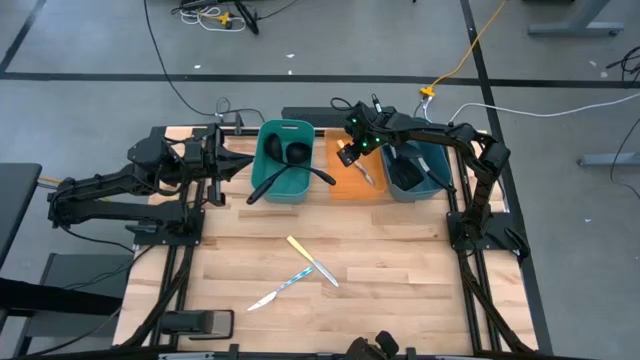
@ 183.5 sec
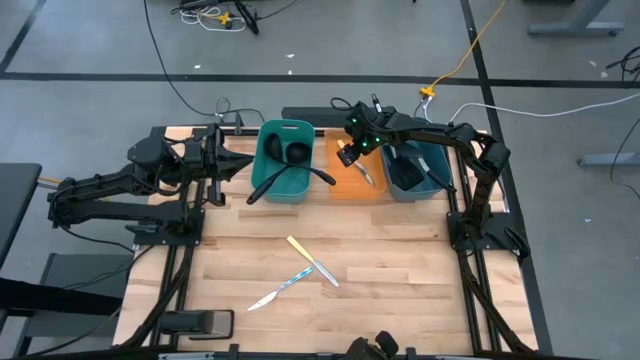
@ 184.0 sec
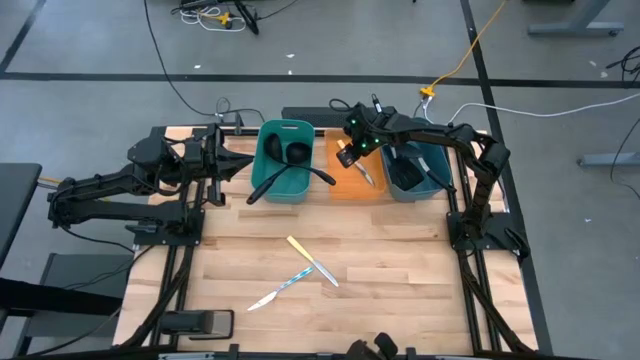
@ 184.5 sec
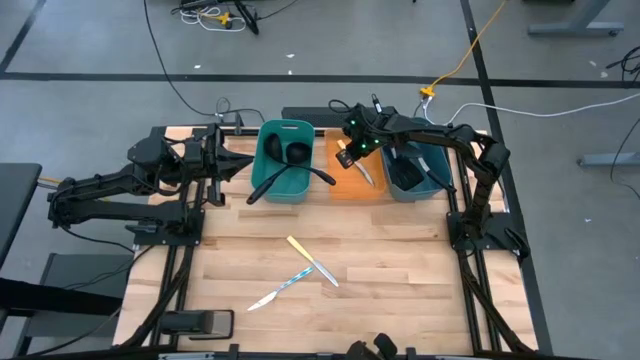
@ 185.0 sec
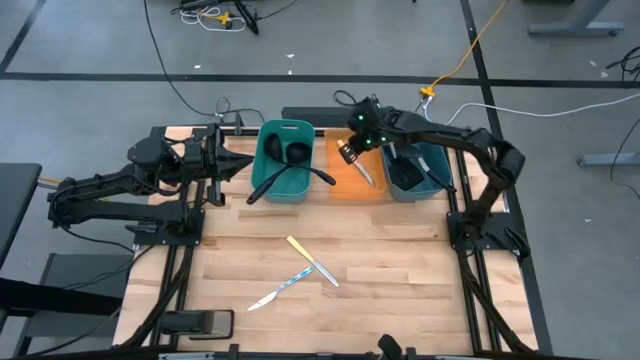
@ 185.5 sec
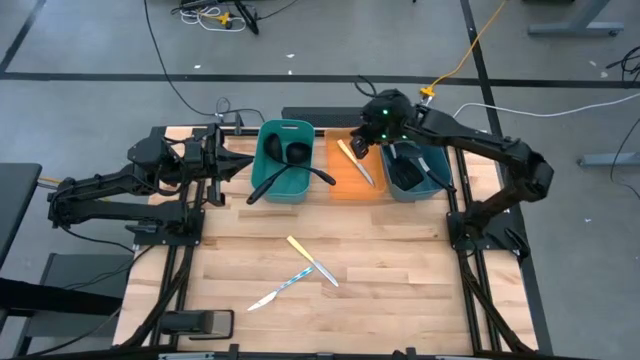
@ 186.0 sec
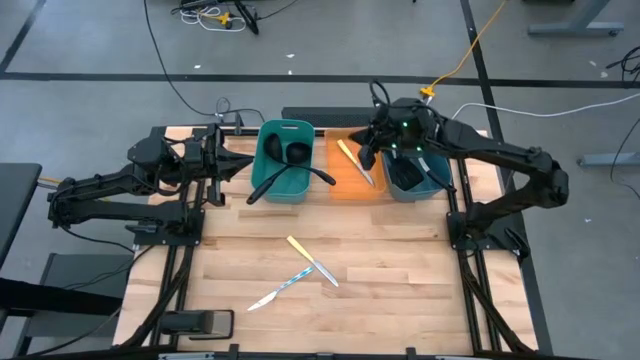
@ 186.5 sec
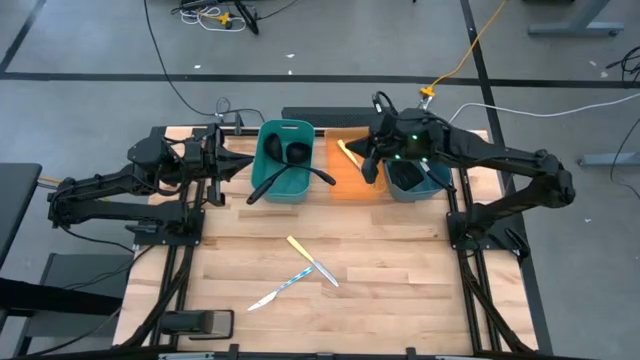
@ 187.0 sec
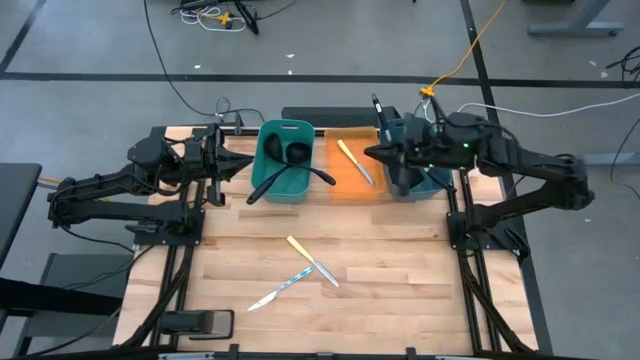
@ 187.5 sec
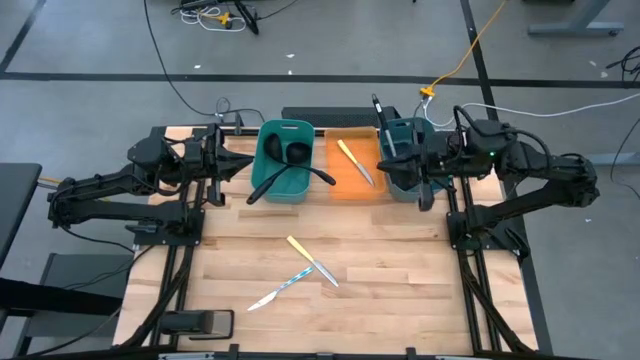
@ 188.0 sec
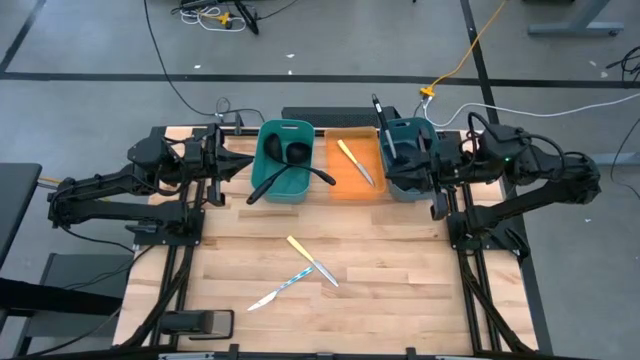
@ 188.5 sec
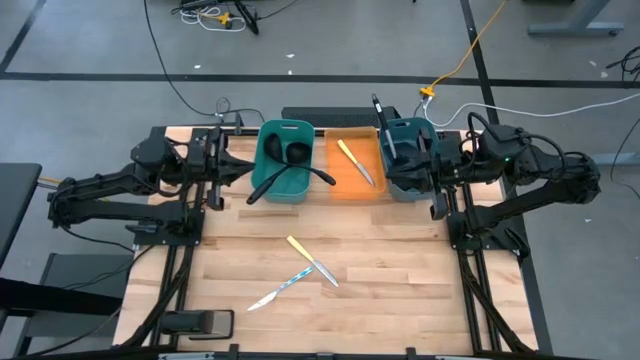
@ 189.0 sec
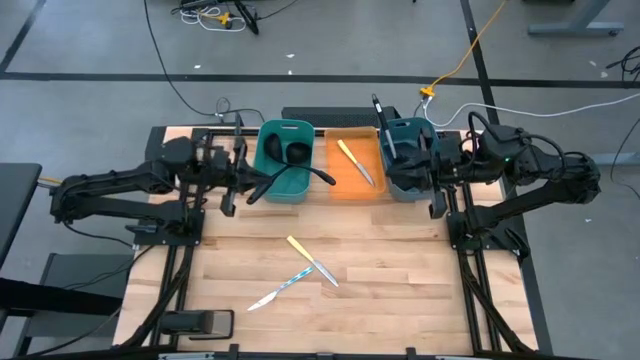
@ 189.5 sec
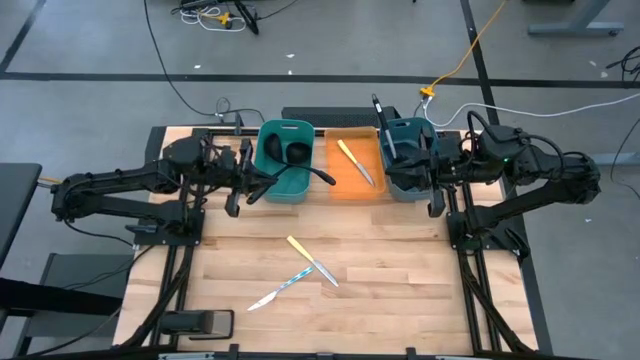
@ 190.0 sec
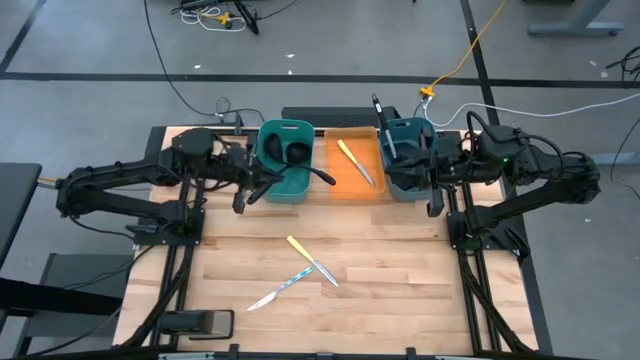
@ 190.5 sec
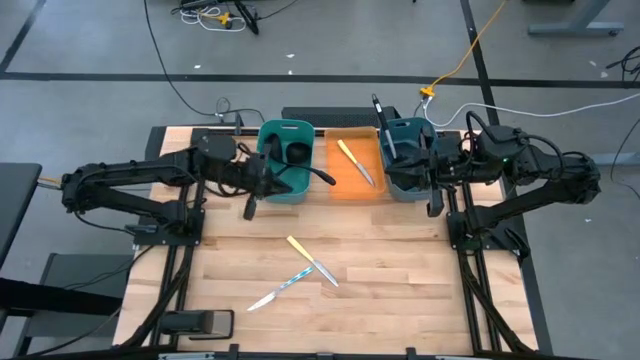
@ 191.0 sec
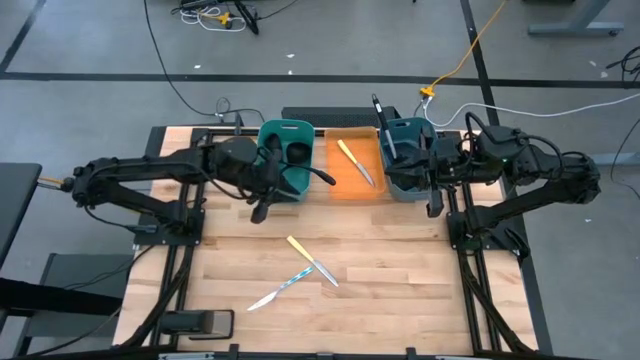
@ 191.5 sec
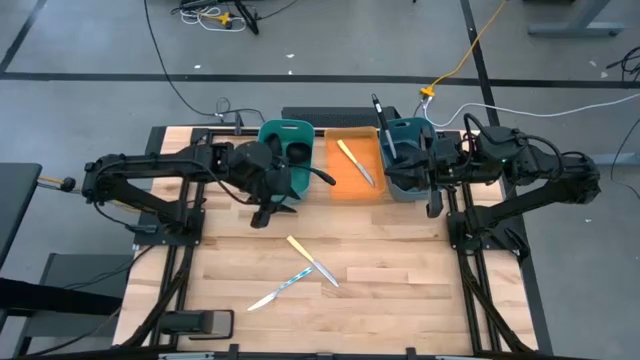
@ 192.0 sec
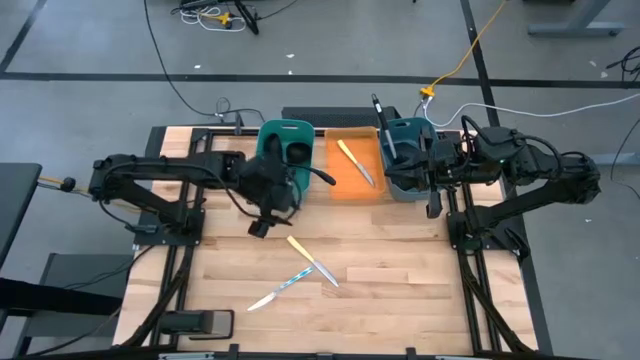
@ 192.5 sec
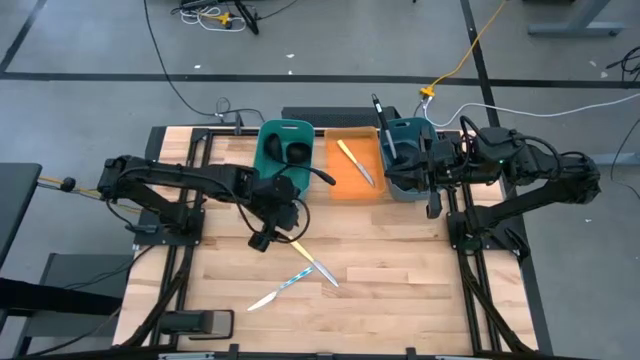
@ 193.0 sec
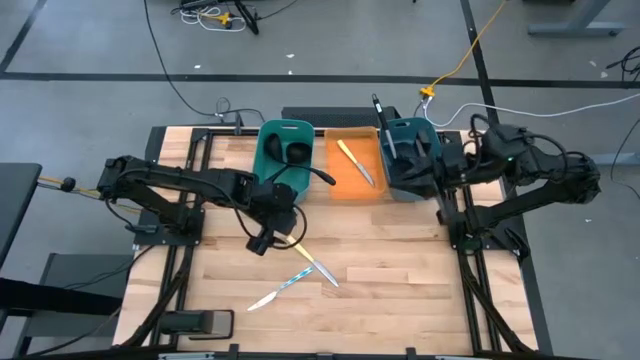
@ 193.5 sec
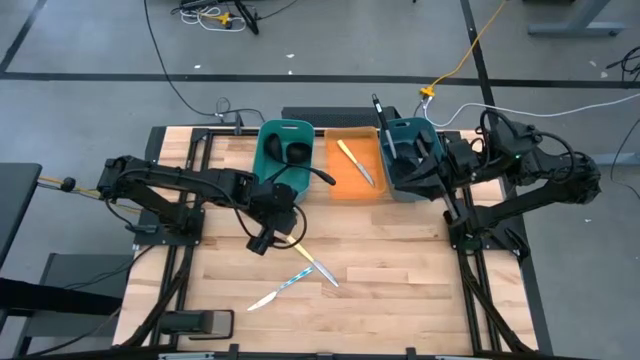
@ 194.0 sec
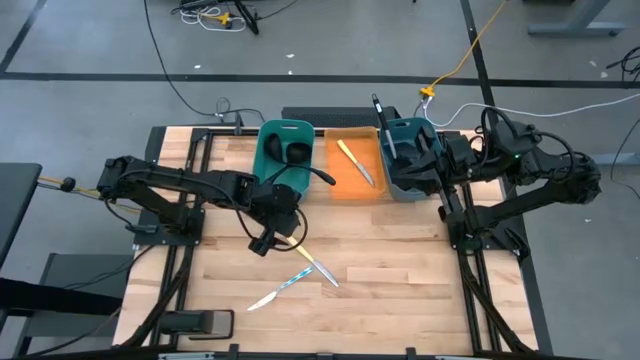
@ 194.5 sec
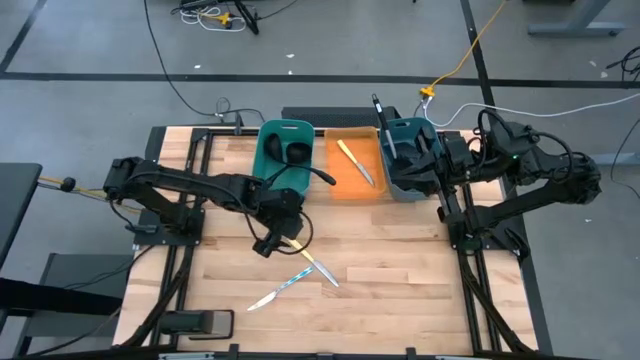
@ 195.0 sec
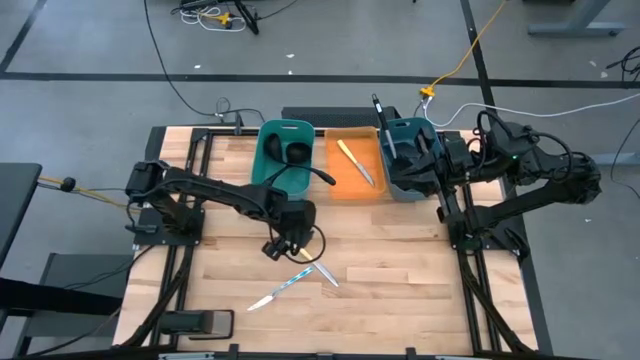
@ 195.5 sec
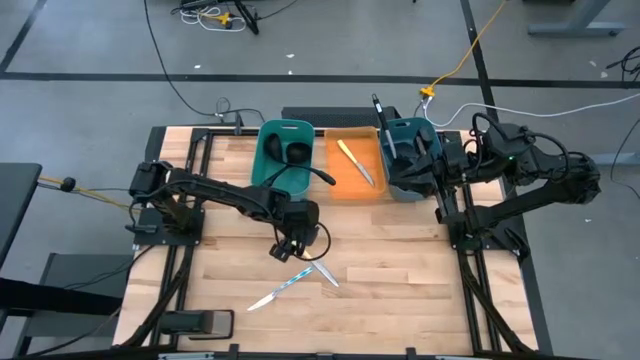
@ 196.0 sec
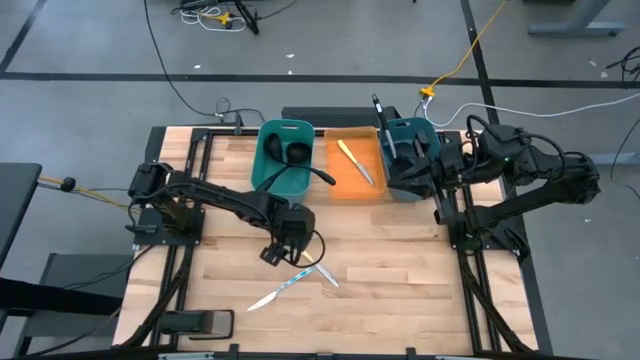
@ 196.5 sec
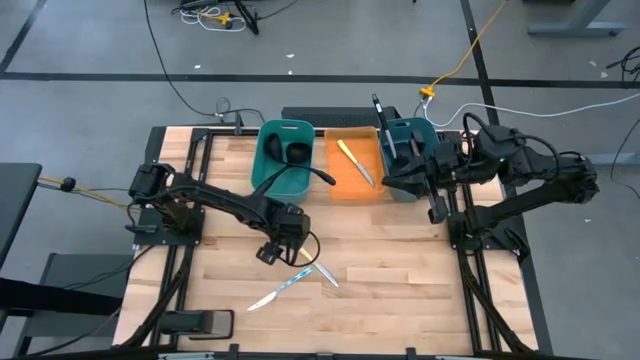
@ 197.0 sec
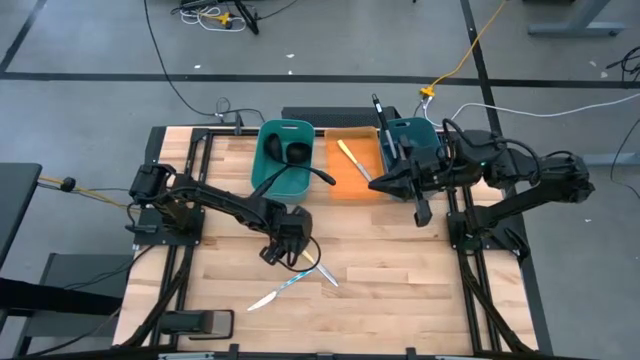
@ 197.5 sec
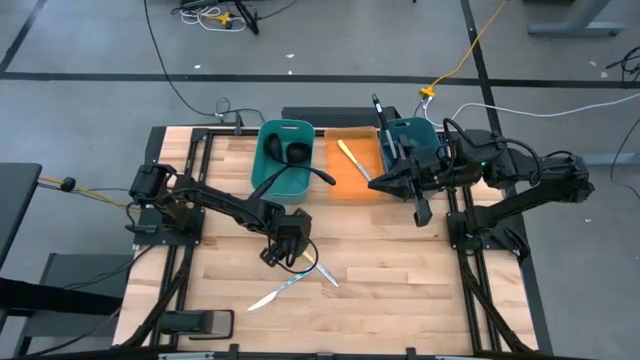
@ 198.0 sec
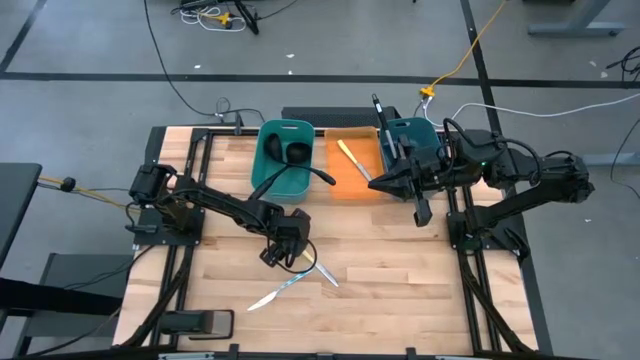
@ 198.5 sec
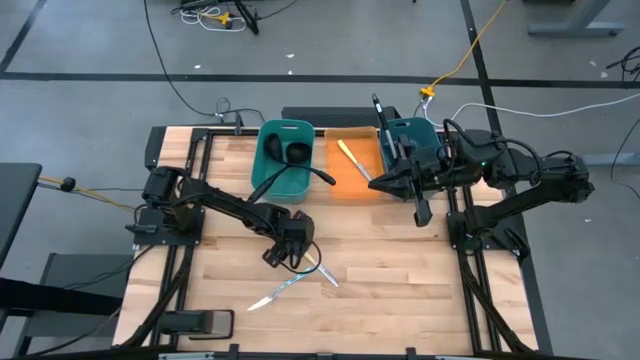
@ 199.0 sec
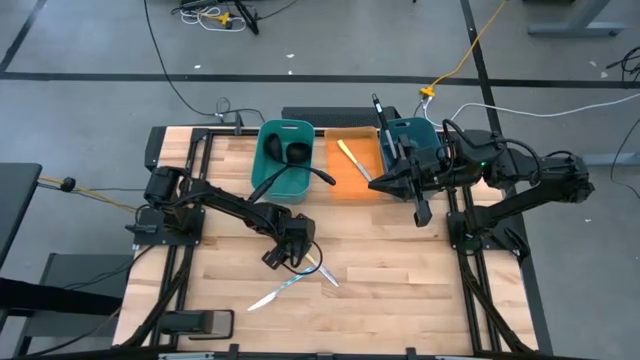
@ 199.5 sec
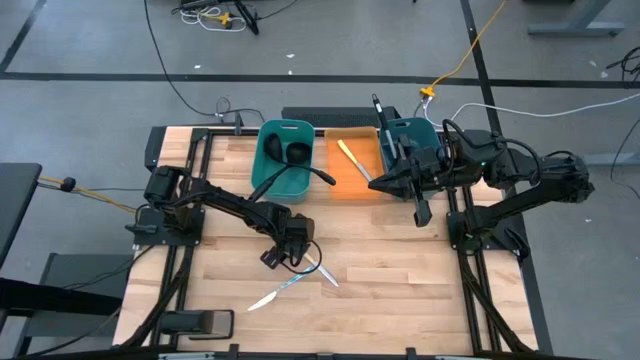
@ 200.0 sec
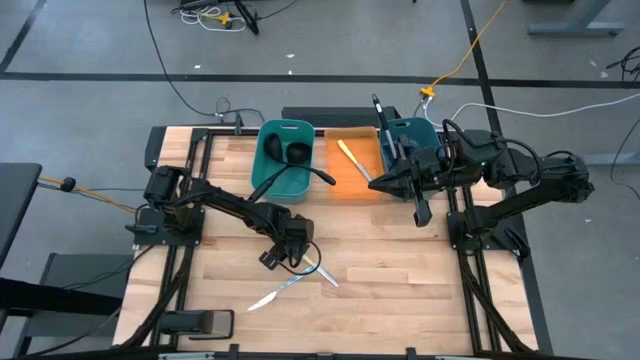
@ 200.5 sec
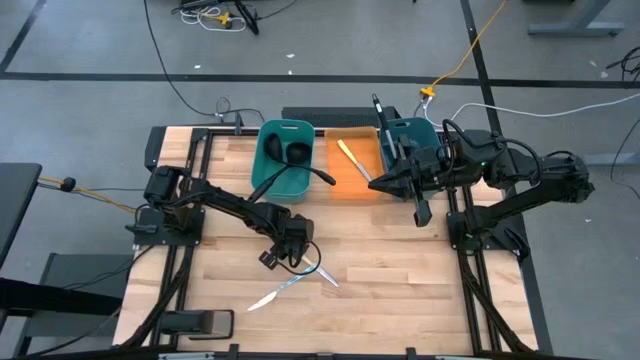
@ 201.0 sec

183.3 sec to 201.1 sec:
Task: Pick & Place Kitchen Items
Put the yellow table knife into the orange bin
